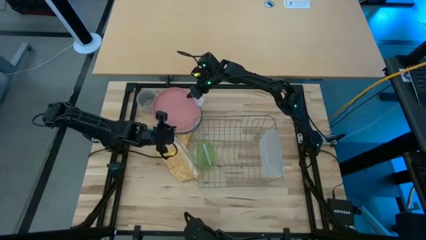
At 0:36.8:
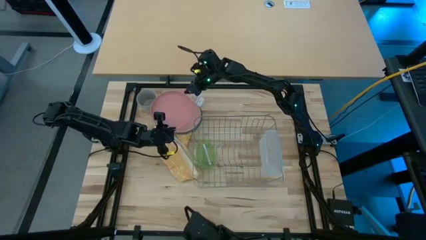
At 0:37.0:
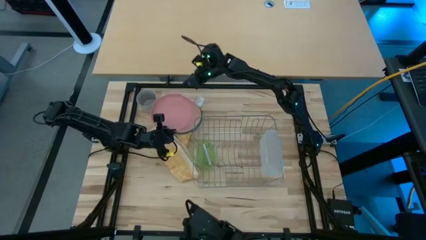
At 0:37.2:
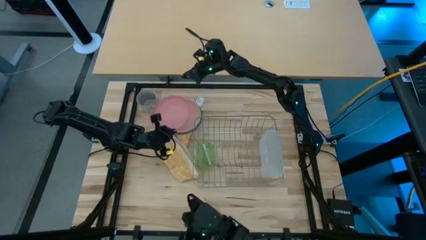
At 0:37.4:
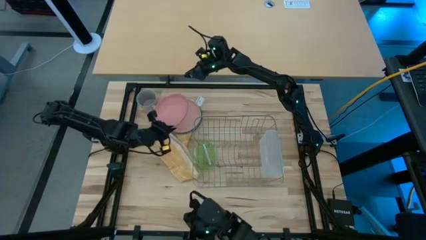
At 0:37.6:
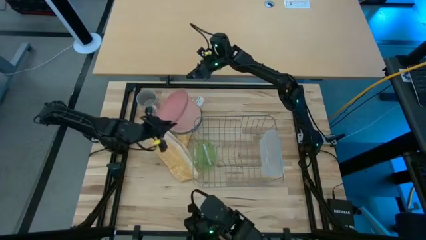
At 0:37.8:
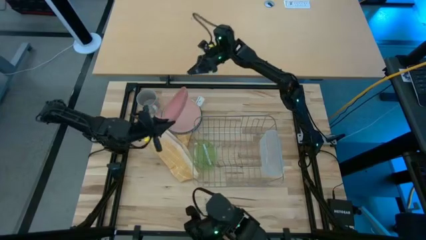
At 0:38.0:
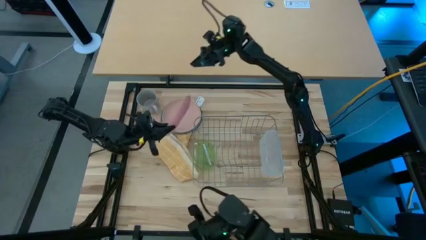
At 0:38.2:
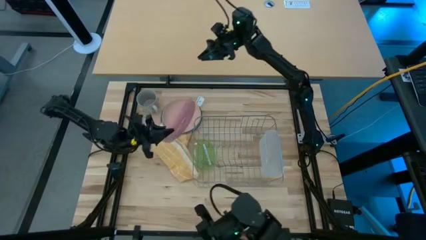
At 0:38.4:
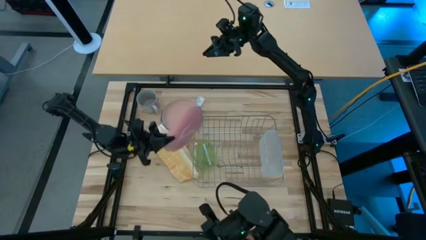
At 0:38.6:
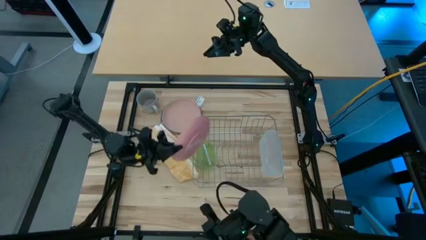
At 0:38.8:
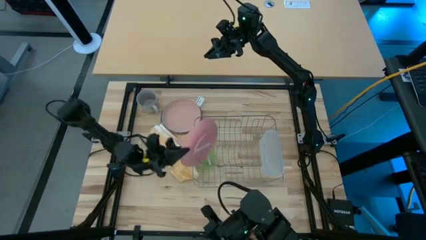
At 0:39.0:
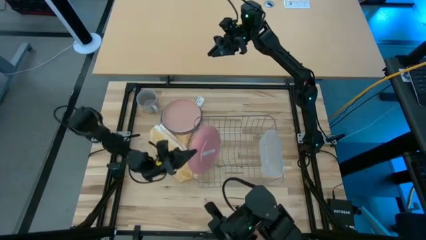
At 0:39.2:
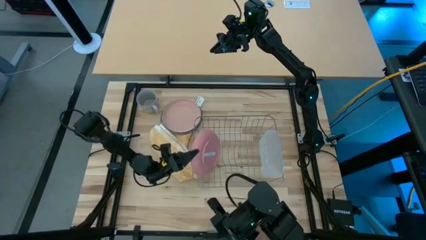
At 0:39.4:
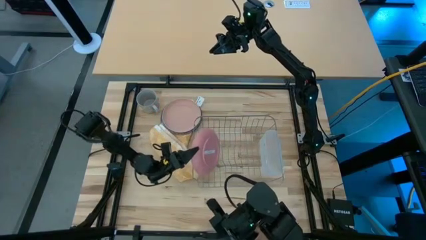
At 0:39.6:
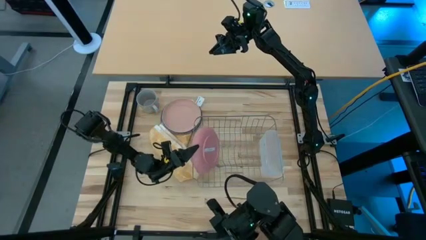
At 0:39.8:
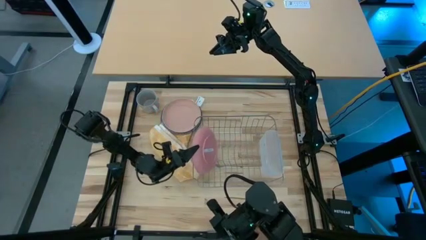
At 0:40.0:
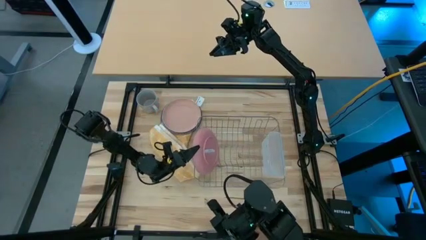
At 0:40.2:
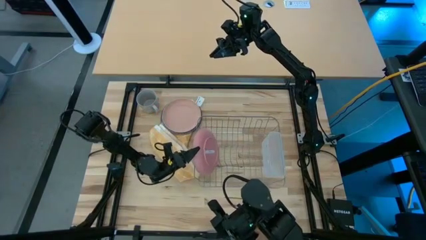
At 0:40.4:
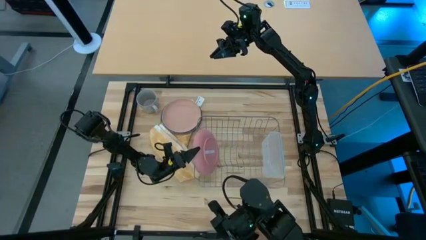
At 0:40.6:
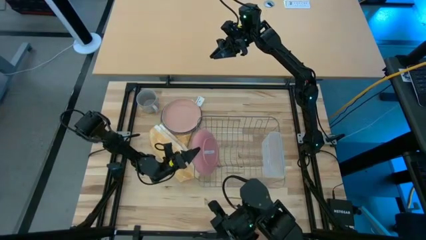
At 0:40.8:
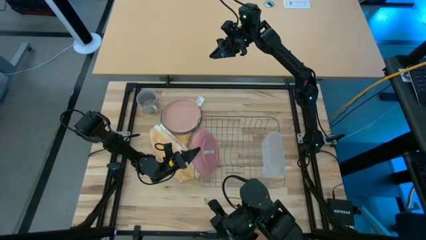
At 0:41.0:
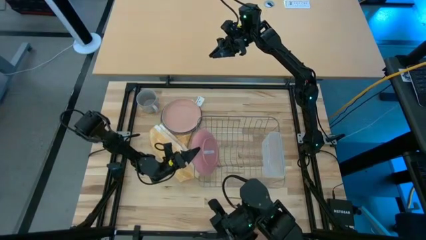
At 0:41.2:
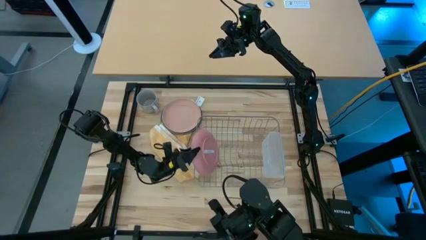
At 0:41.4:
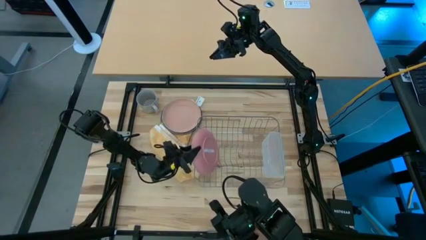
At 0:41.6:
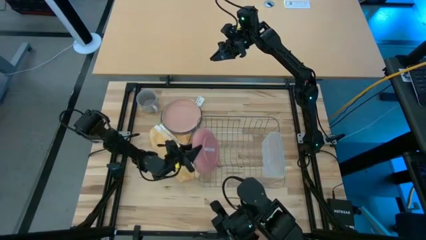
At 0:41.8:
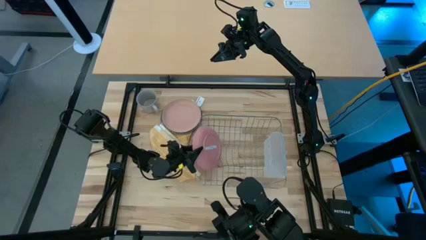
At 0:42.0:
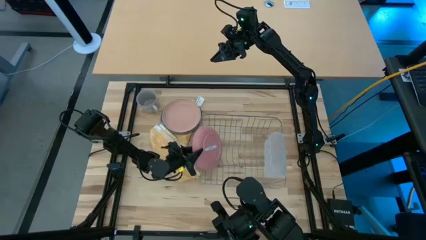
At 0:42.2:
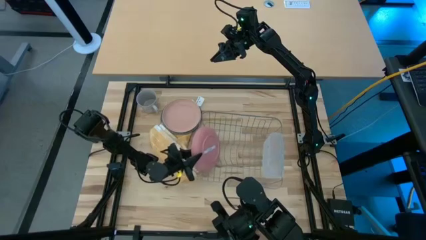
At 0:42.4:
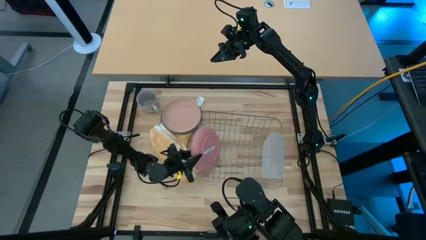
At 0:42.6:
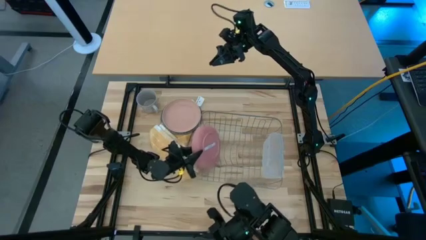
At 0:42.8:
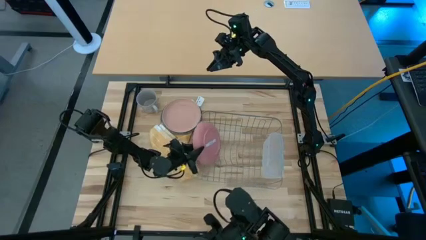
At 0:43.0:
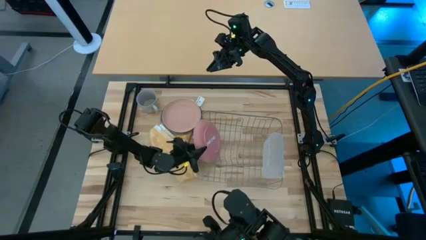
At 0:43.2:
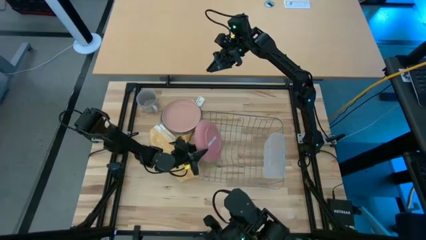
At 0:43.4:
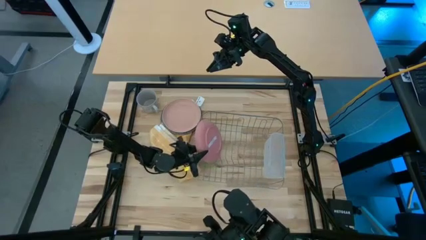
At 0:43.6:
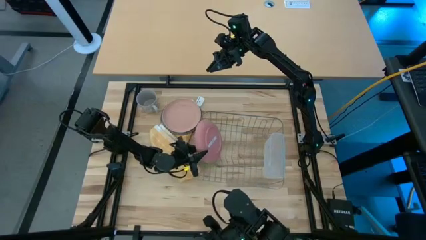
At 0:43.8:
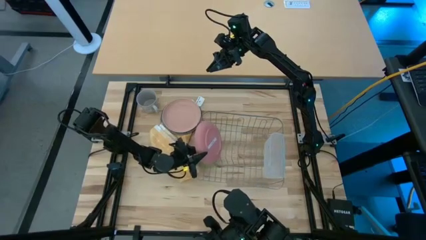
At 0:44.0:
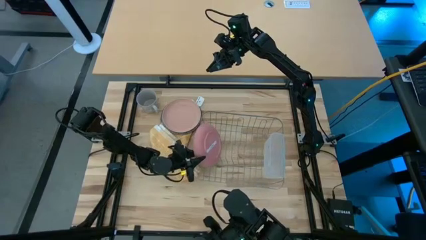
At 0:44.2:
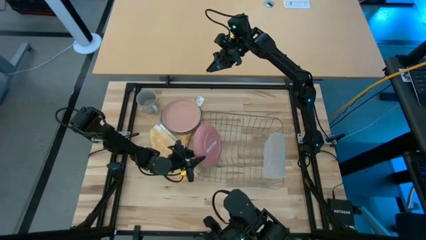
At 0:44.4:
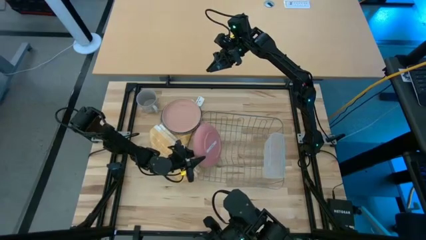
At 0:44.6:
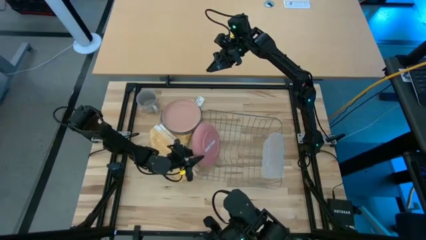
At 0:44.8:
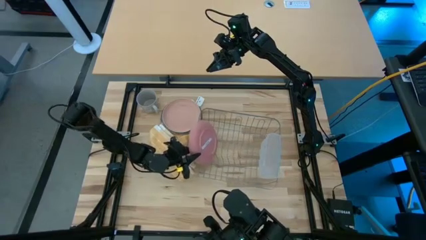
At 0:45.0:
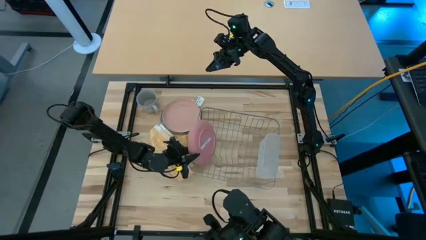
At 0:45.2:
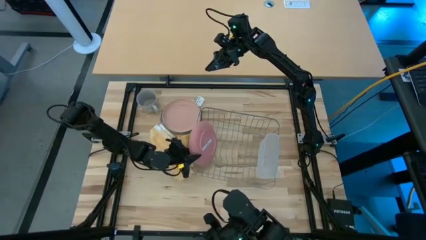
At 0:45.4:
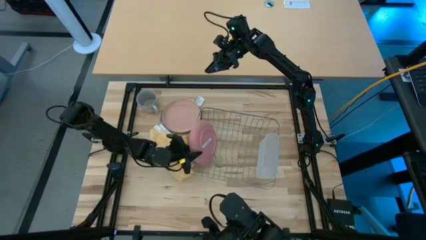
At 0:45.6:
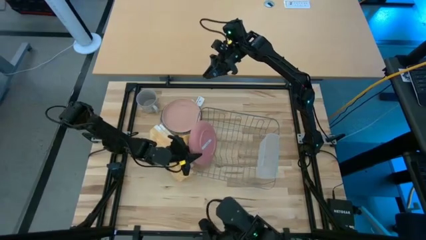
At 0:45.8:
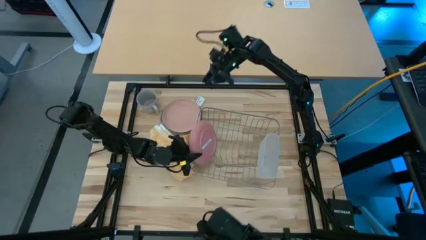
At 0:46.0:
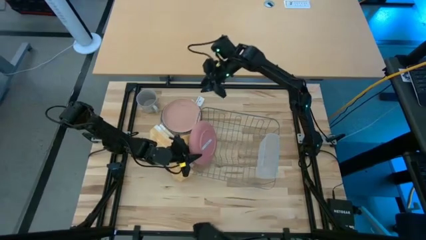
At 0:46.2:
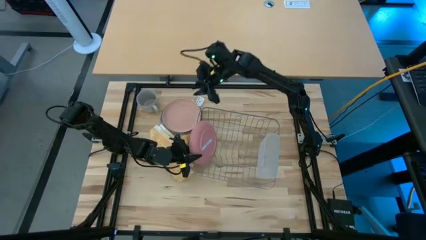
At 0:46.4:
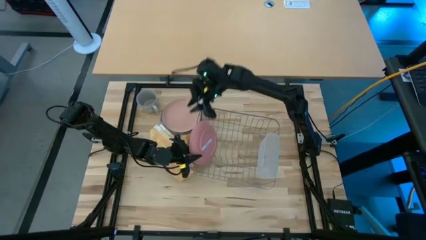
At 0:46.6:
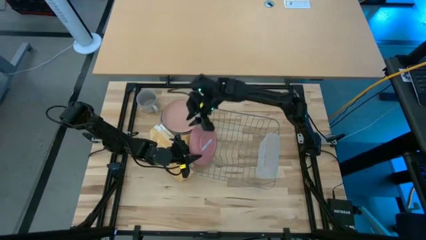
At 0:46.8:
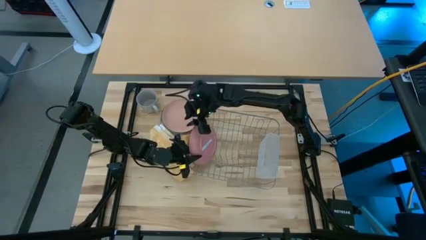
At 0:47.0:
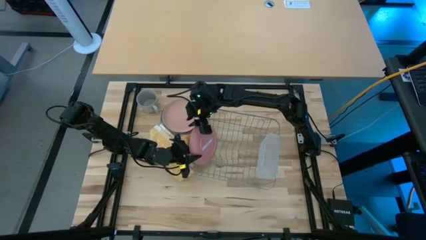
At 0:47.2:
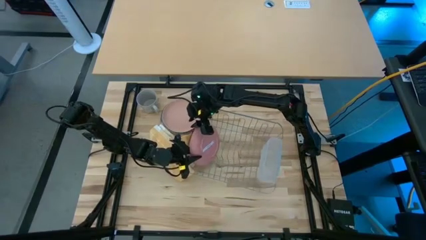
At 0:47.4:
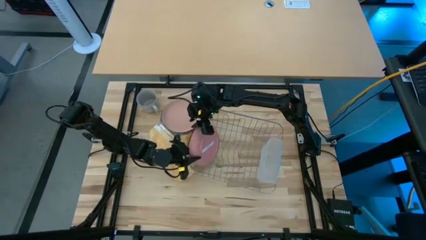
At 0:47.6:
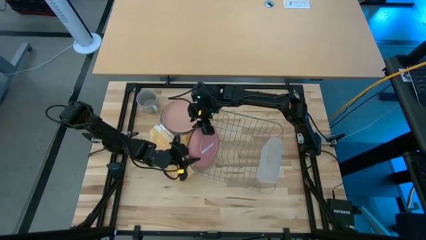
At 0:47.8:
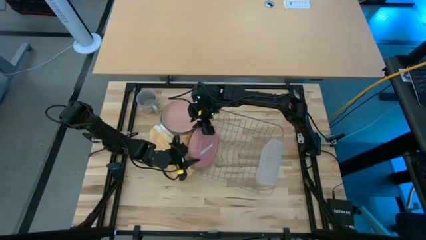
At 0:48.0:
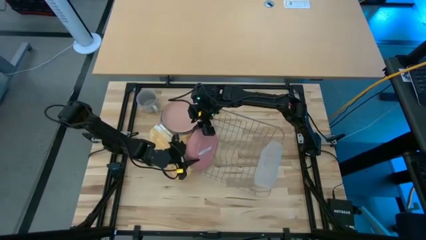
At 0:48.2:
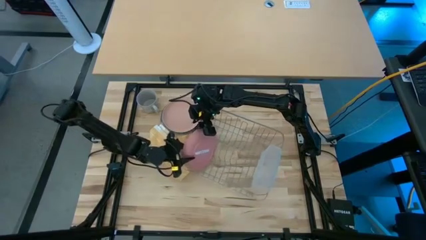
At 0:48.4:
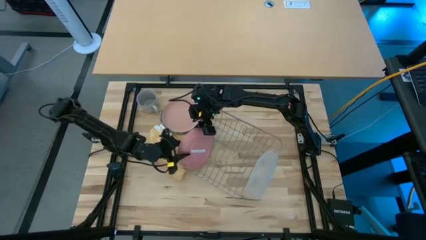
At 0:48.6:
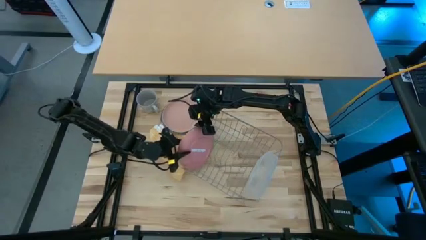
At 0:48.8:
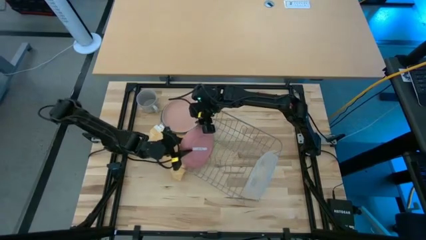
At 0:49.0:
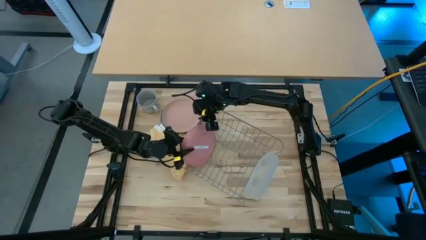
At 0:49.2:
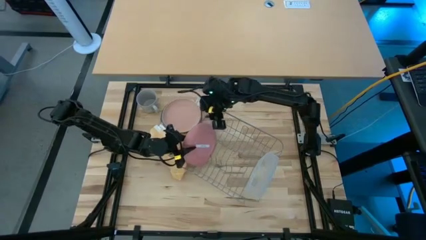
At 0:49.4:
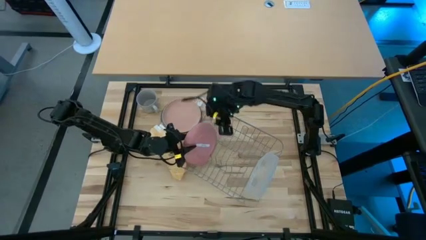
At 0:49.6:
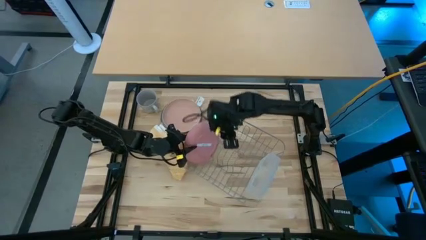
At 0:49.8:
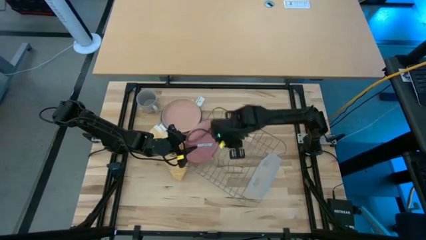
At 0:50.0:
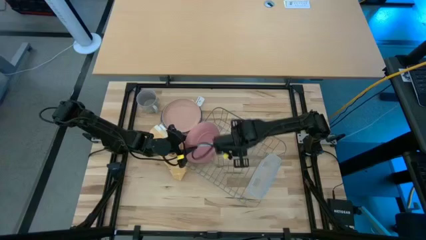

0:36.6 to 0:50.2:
Task: Sort dishes
Put the pink plate in the dish rack
